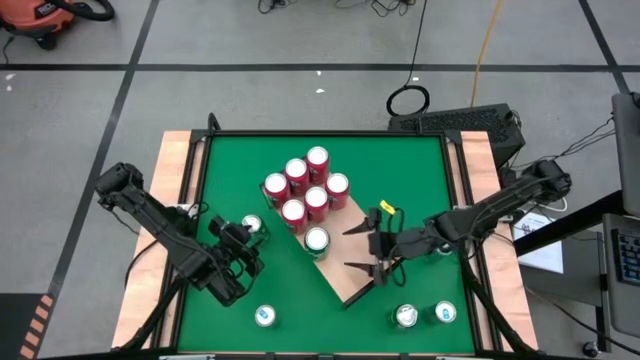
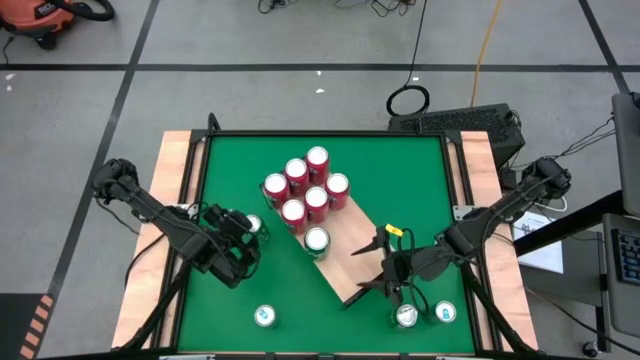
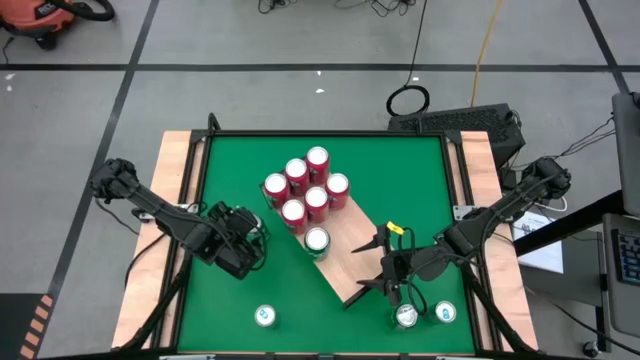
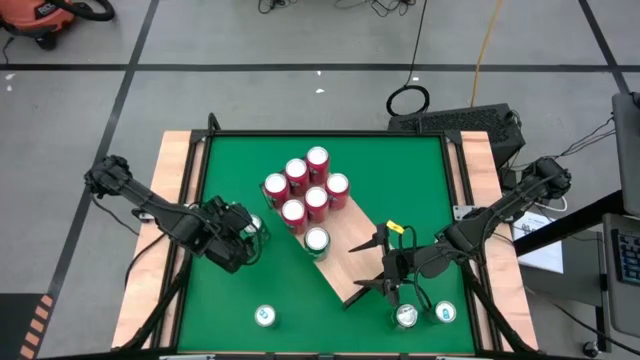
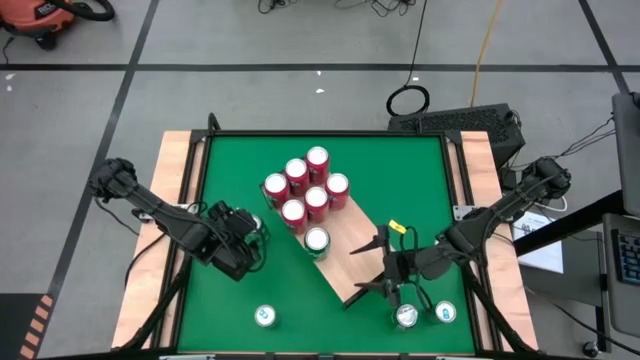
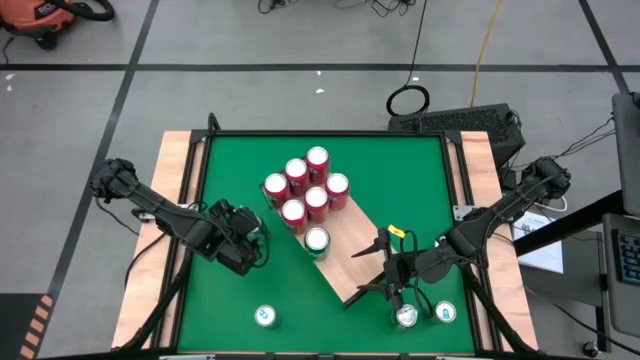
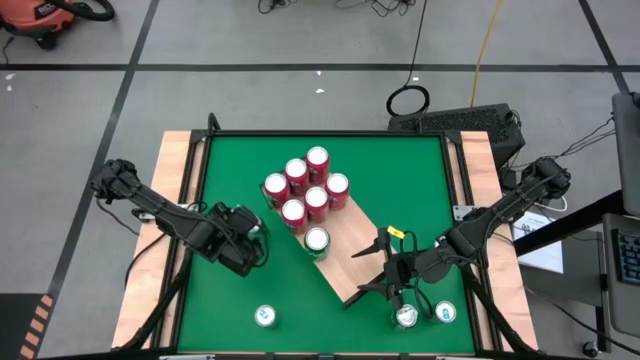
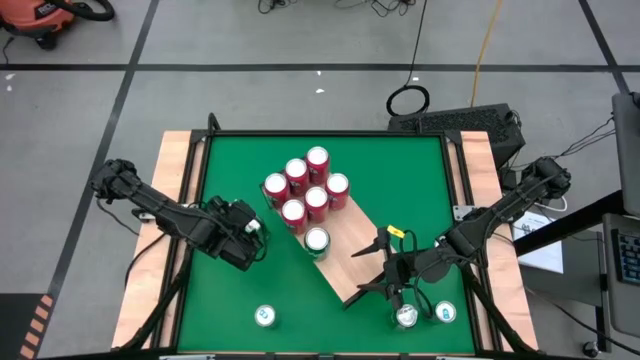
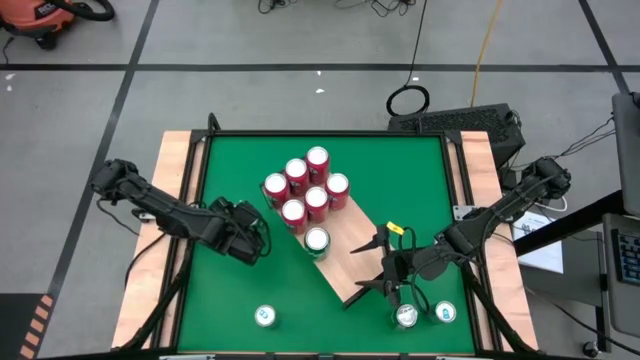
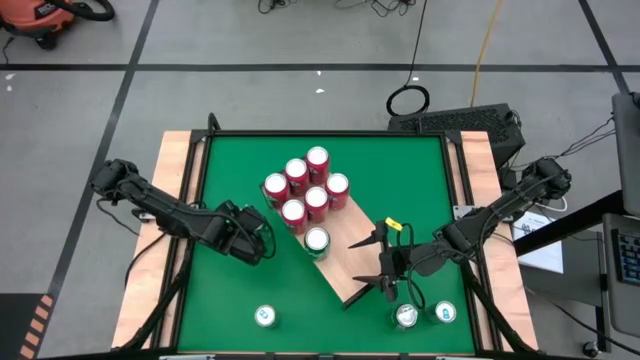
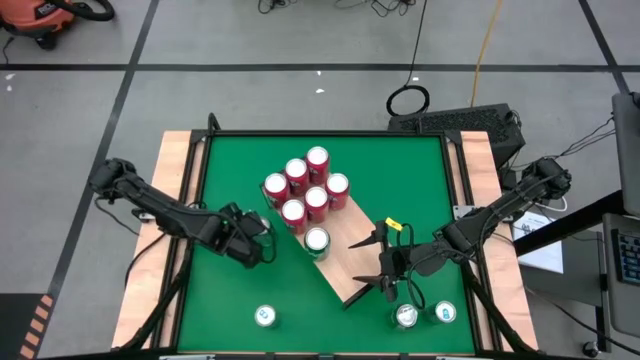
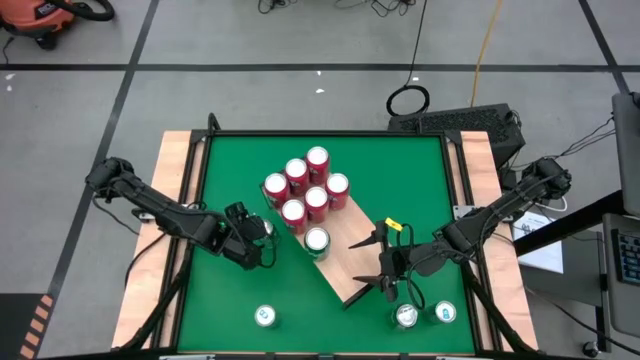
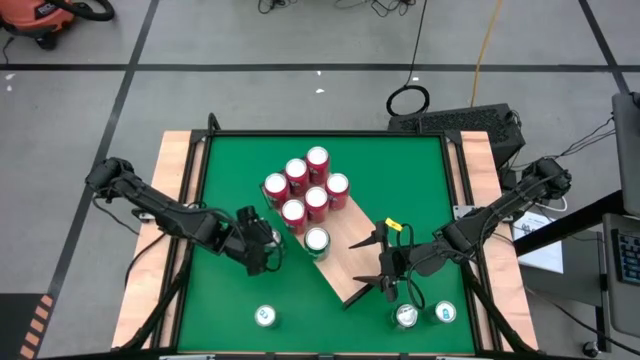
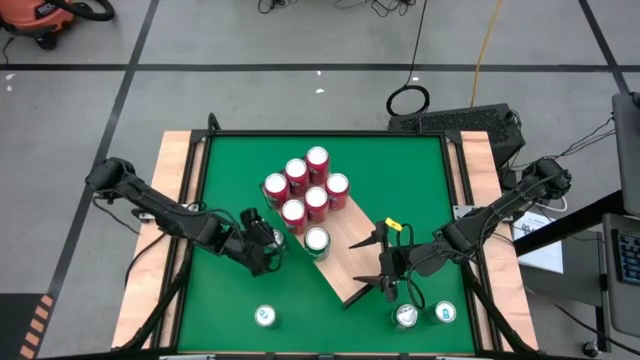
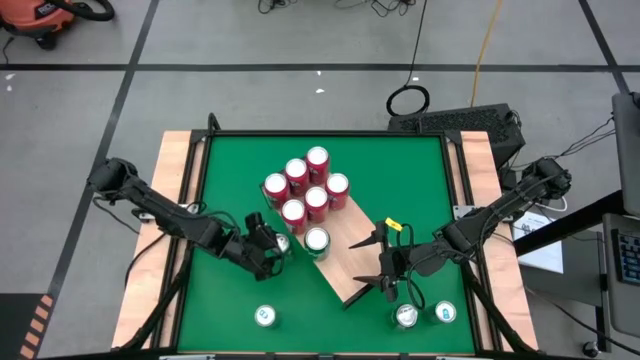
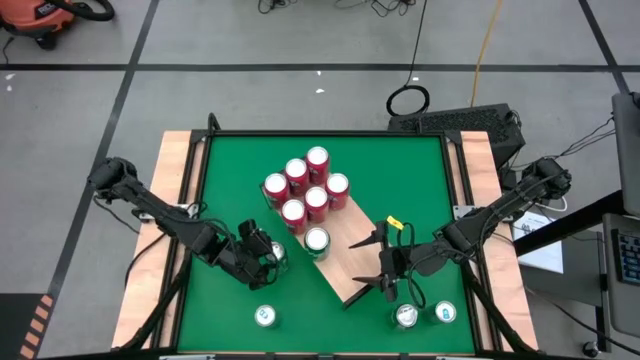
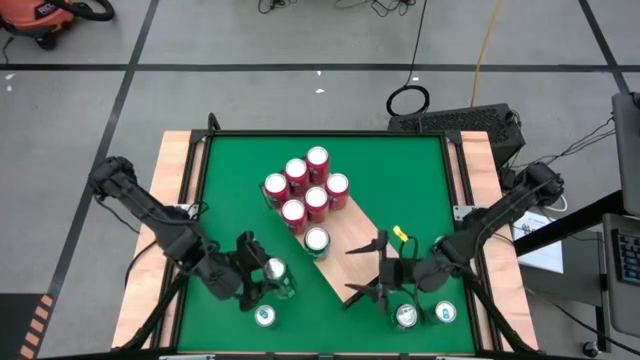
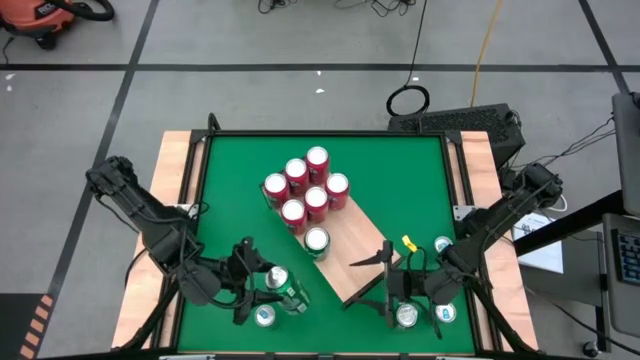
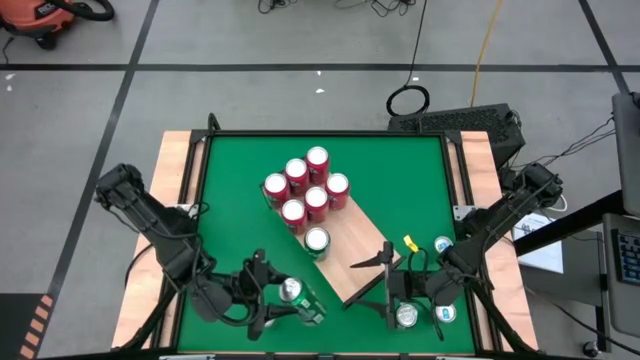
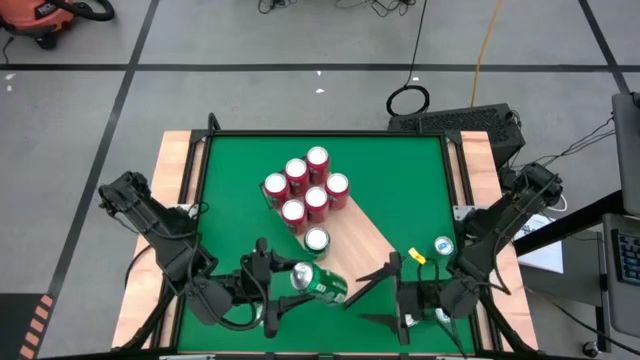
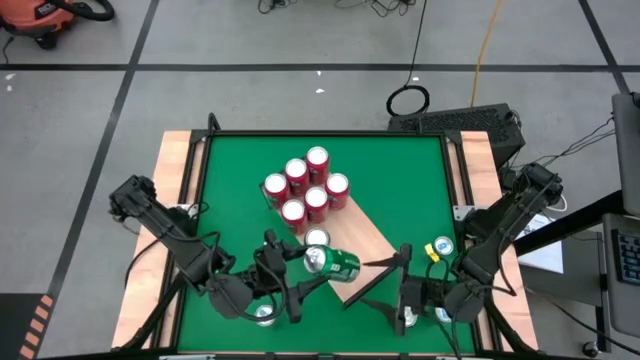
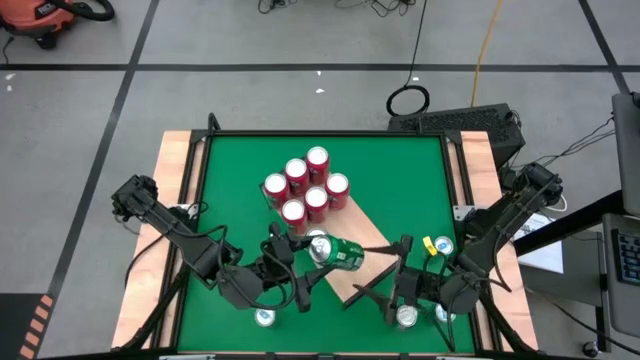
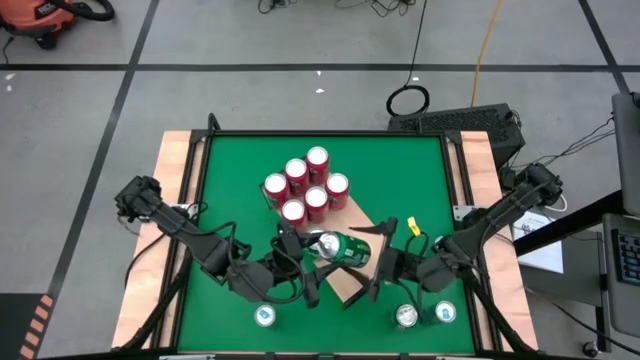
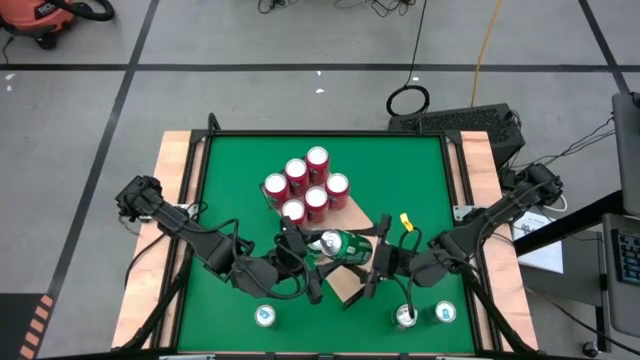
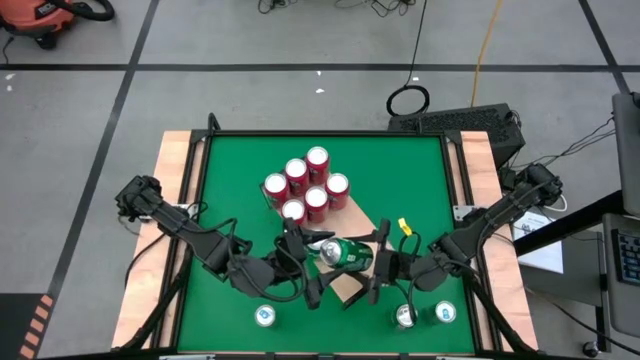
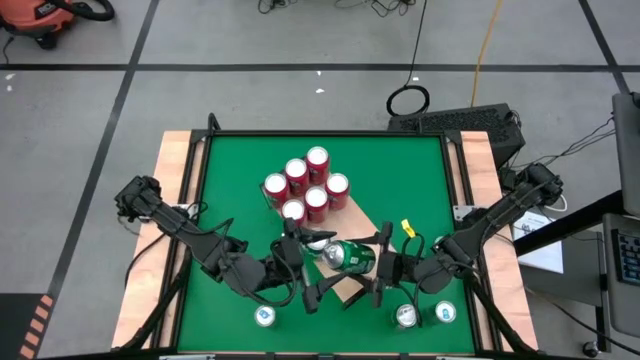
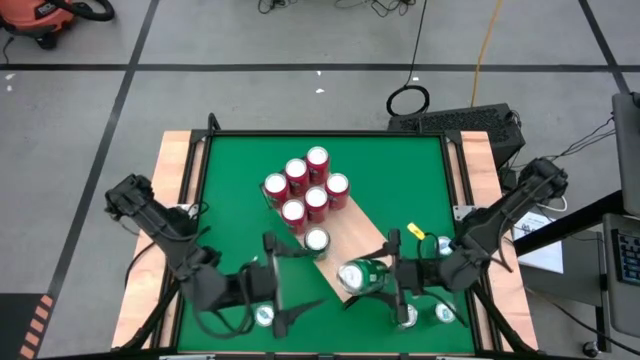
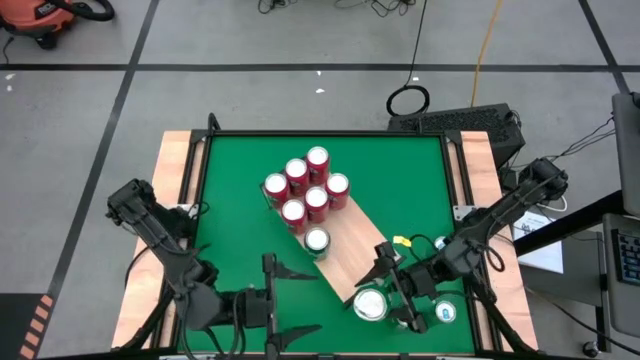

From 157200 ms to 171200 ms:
Task: Place canned beverage on shelf
Put the green soda can on the shelf aligned with the other green soda can

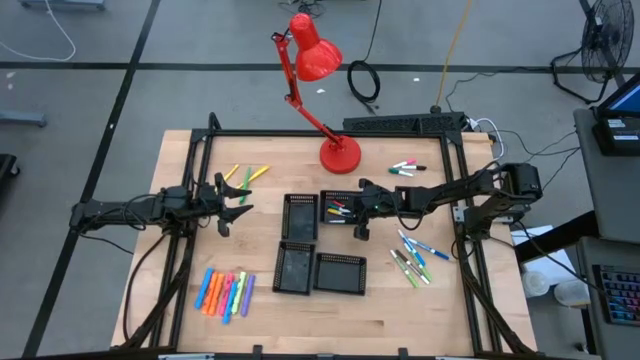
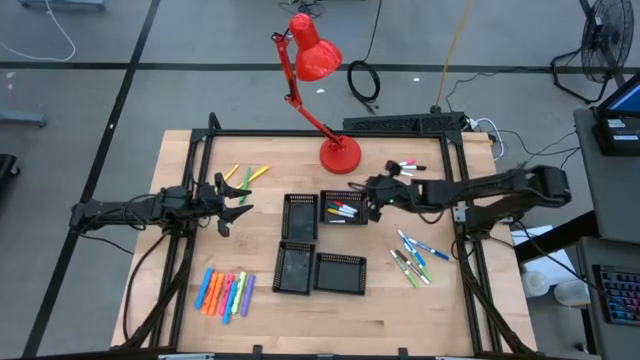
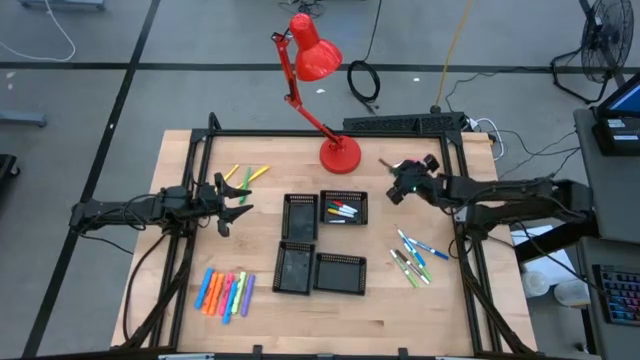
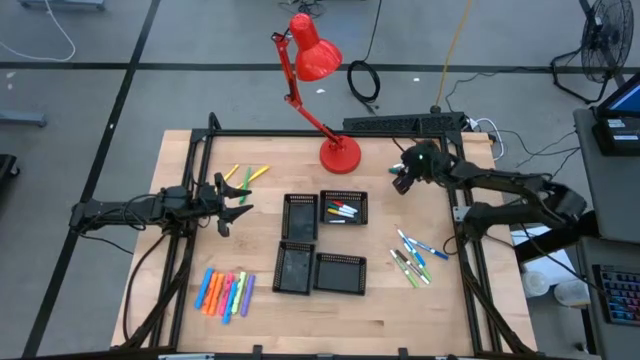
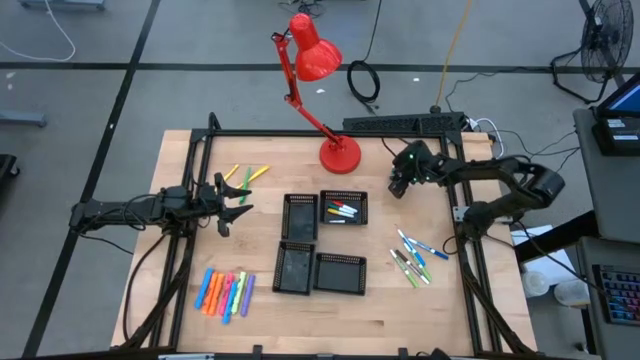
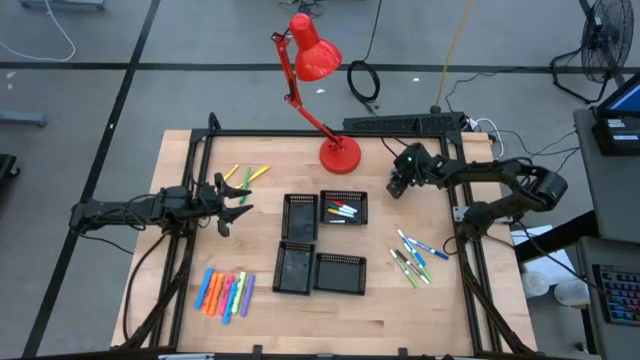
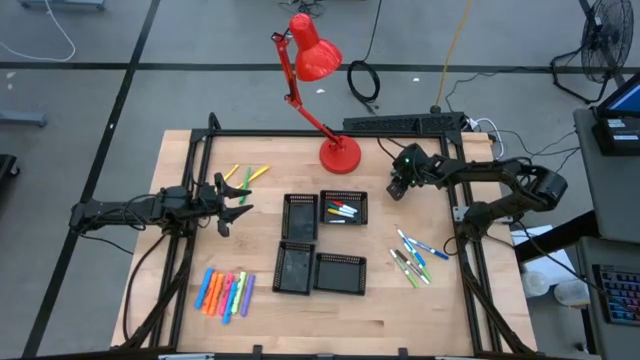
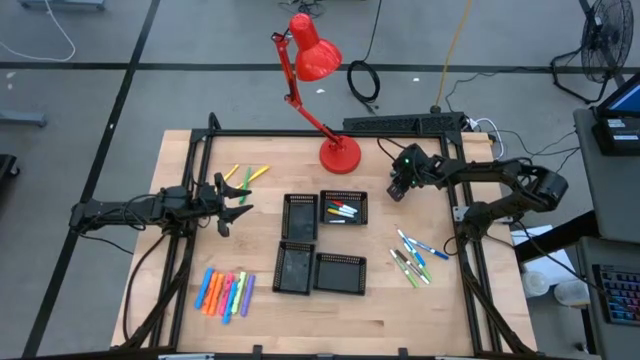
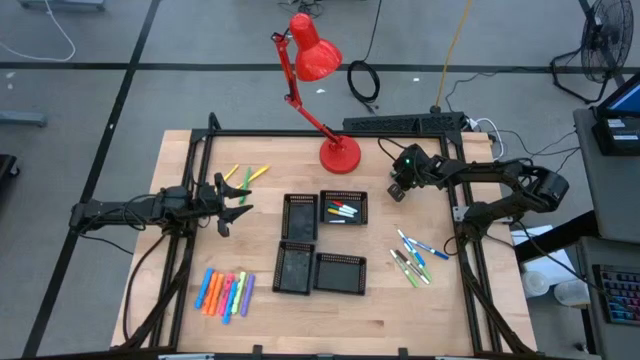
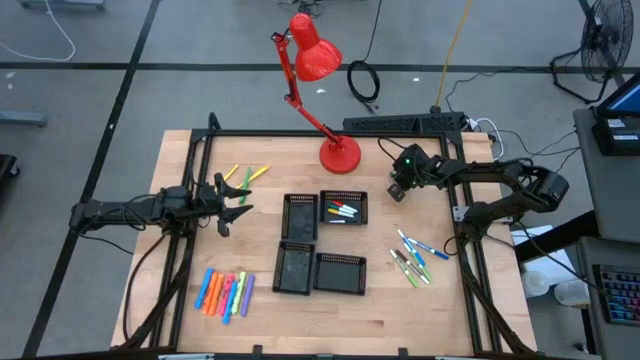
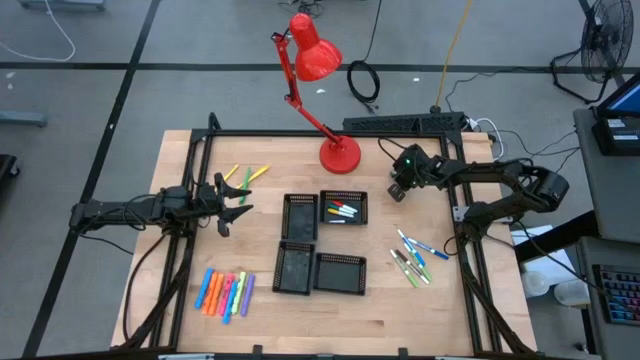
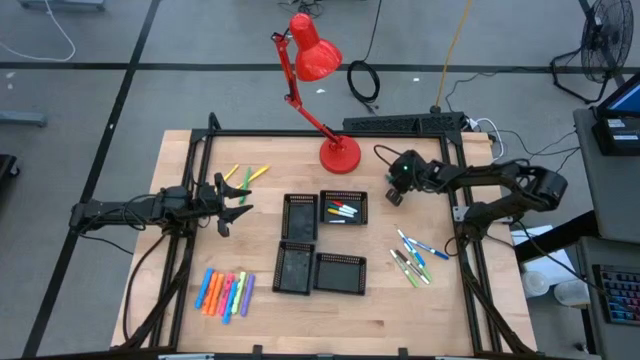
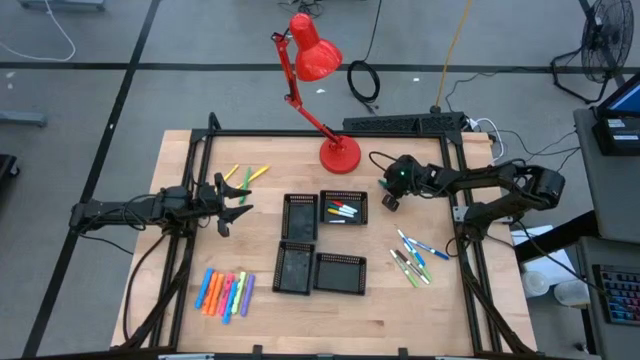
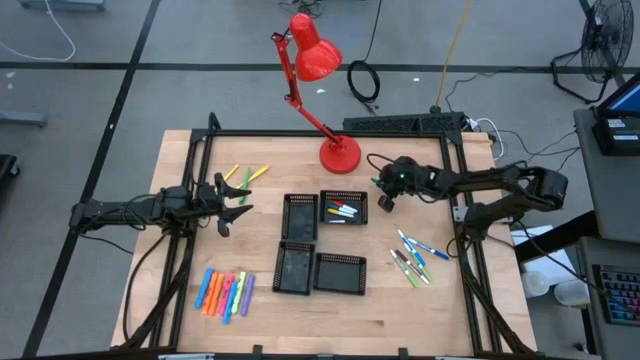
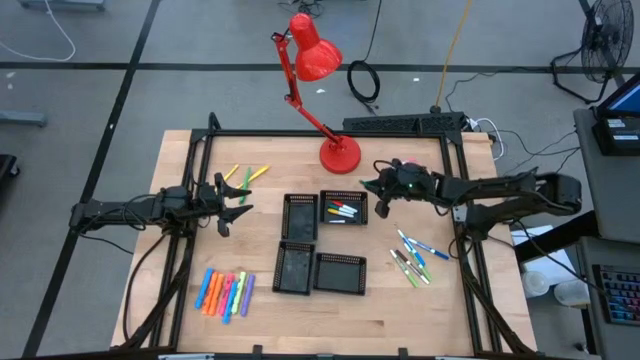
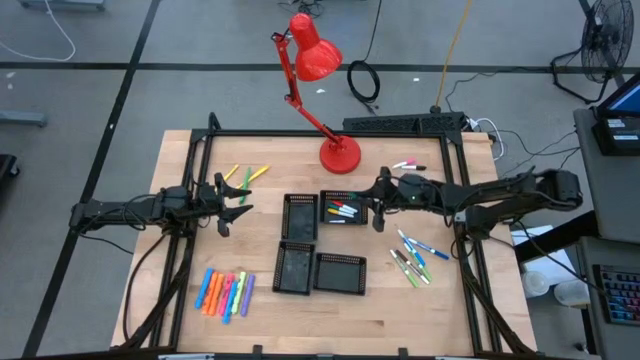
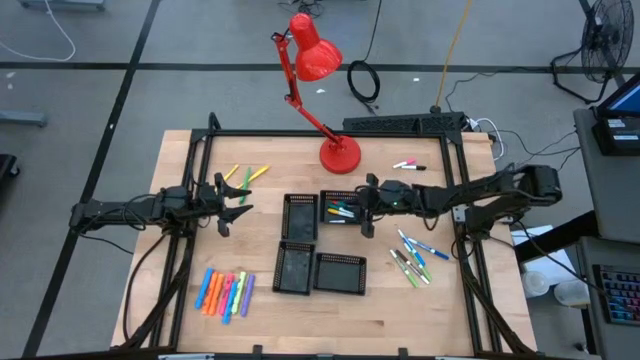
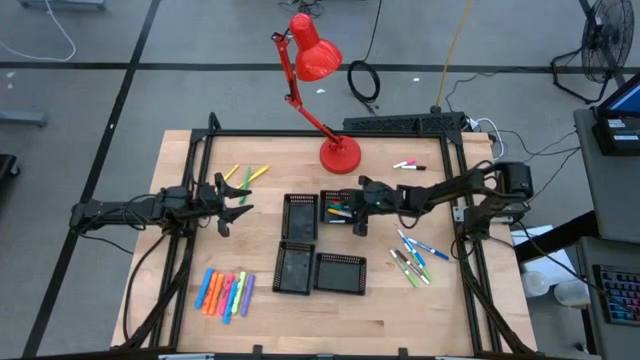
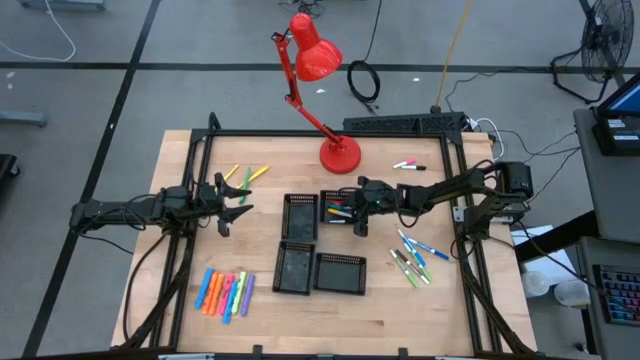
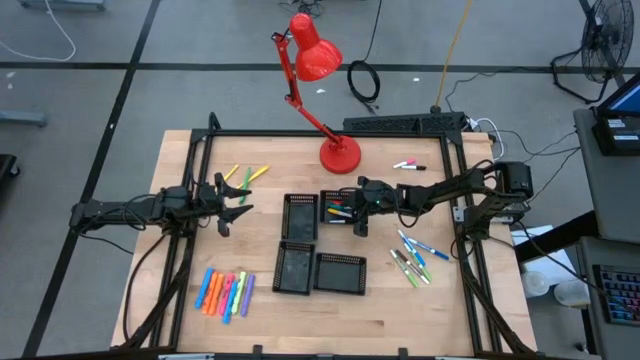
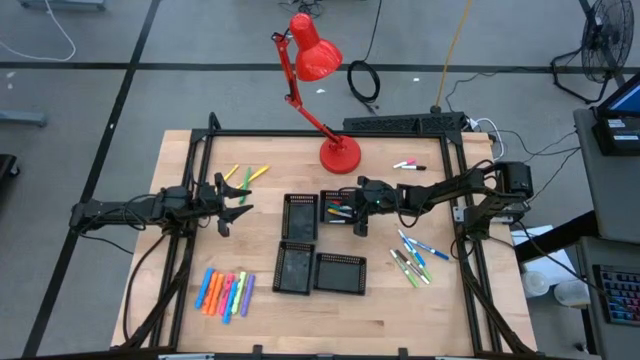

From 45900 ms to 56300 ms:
Task: Pick & Place Markers
Put the dark blue highlighter pen into the top right black bin
